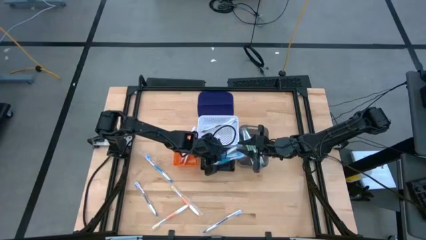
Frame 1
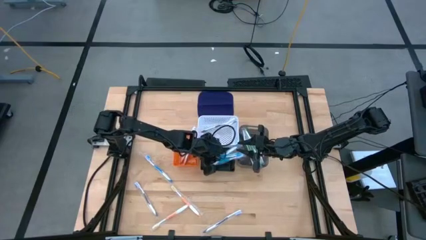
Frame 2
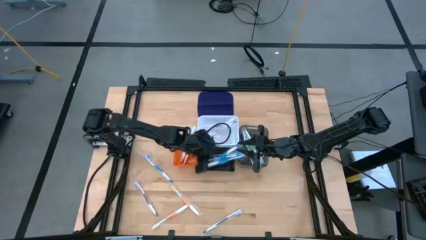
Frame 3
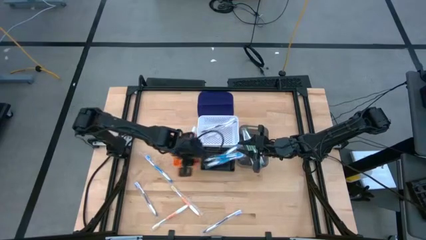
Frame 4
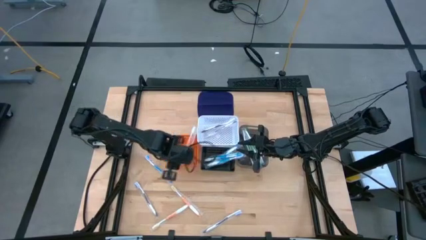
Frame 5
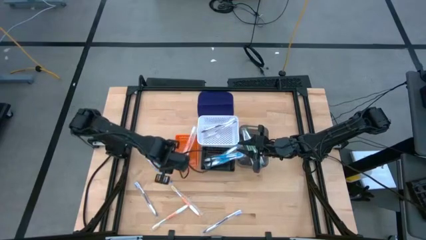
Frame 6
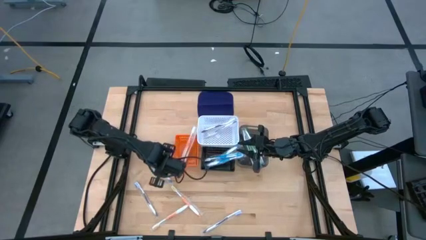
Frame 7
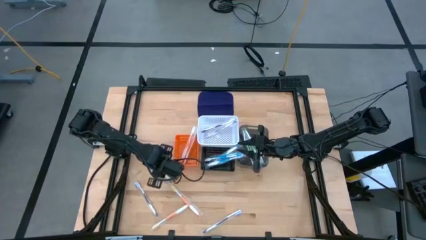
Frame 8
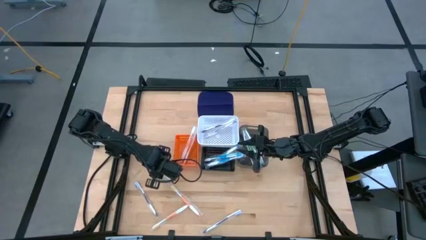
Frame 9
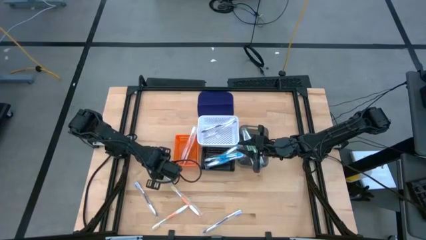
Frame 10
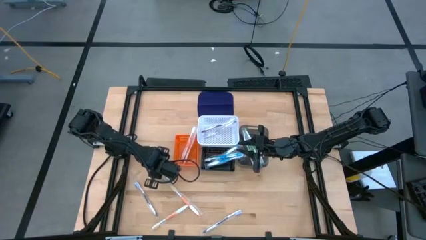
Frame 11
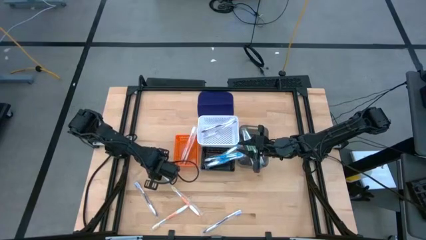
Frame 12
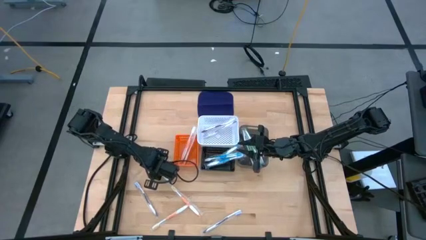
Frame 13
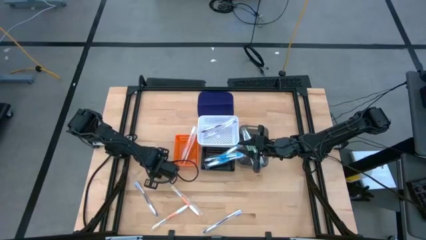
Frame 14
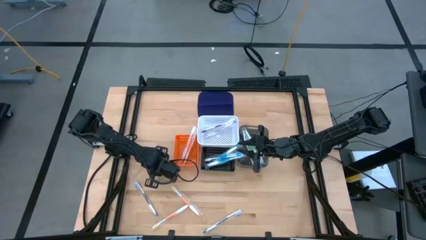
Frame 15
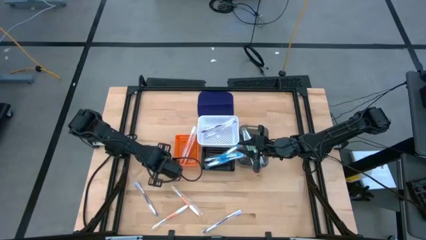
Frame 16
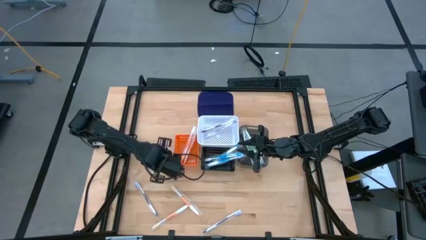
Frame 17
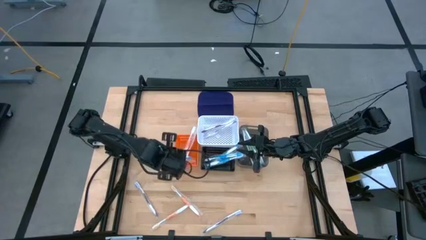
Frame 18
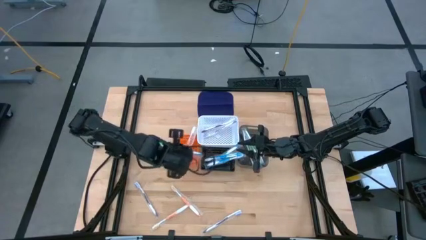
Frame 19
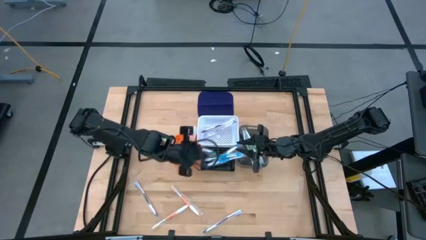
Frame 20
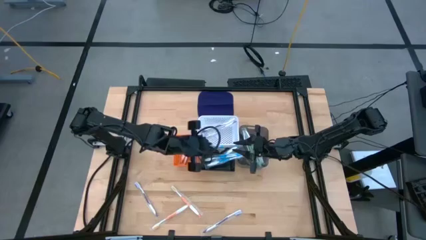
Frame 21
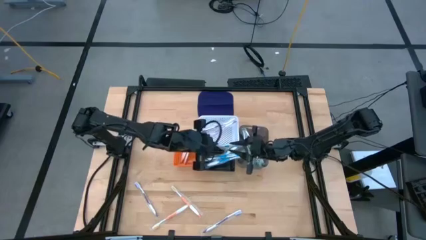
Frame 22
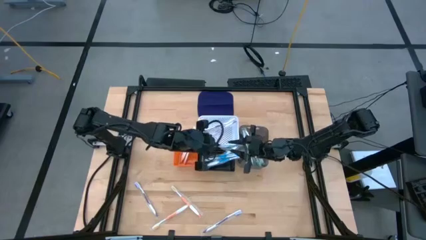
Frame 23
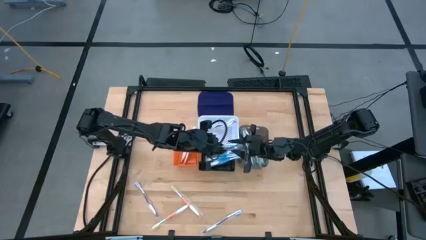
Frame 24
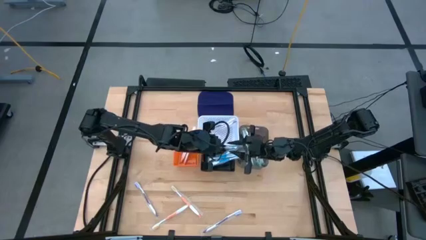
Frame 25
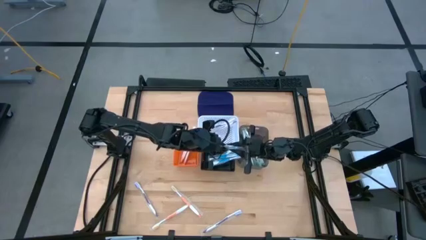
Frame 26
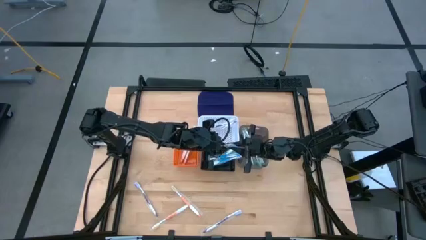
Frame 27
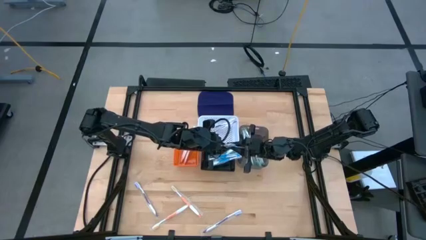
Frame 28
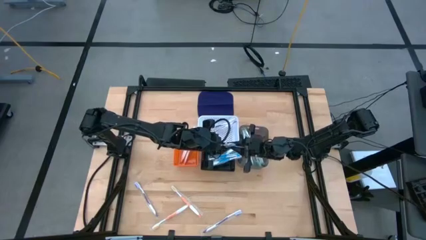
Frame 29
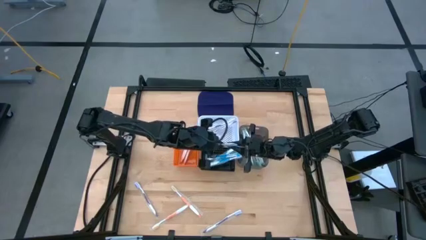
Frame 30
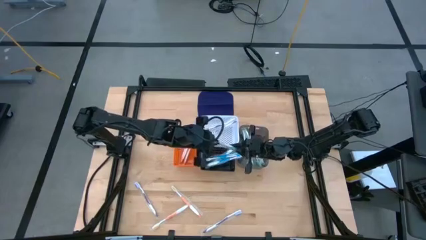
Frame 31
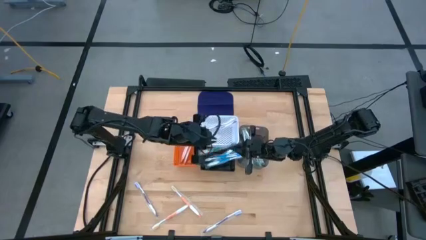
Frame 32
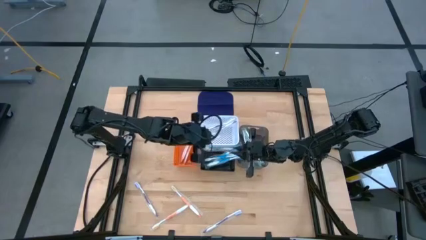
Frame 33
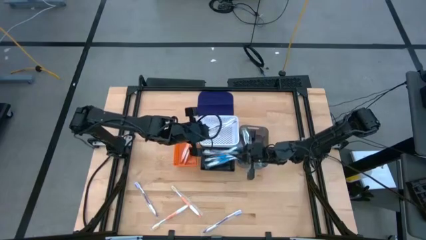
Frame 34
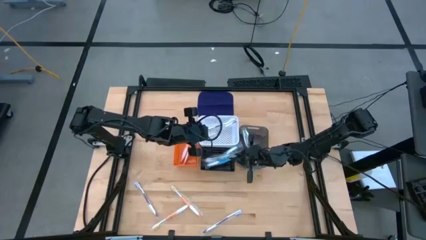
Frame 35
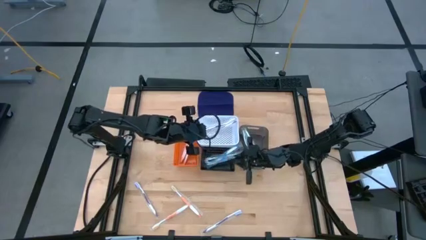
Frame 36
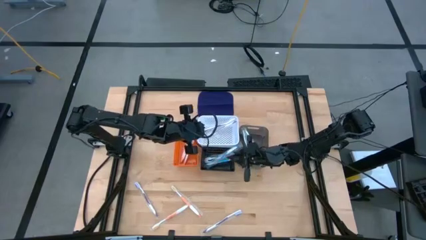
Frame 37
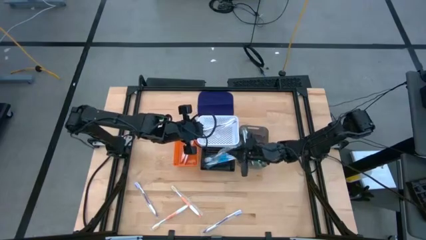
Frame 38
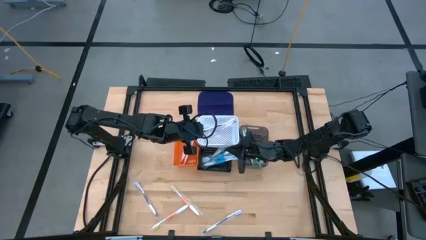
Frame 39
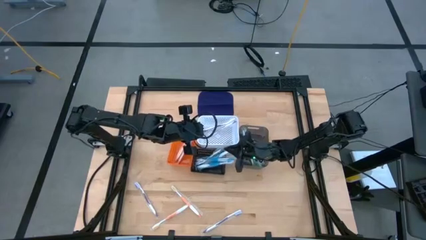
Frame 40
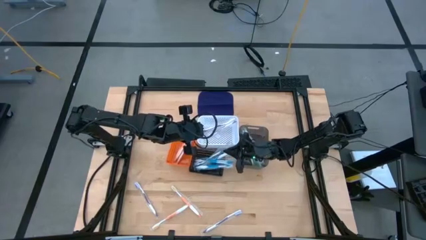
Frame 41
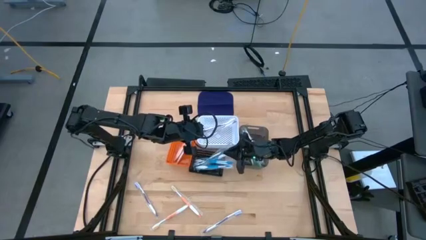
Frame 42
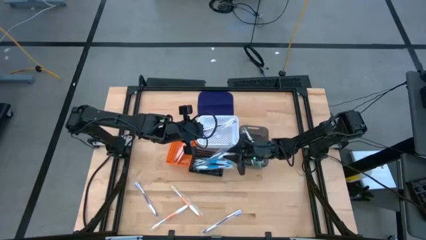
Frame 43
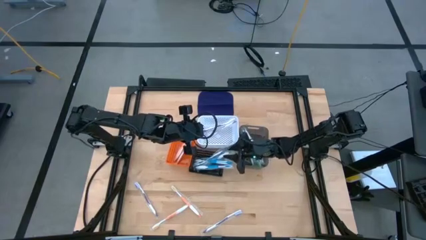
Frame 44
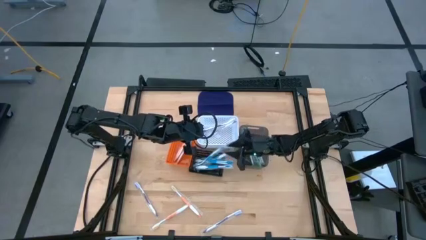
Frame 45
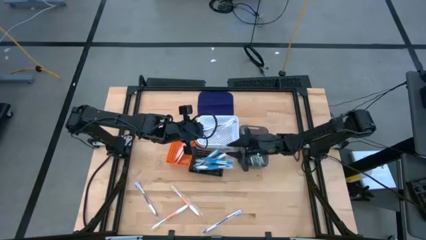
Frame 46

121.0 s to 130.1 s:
Task: Pick & Place Toothbrushes
Put the blue toothbrush into the black basket

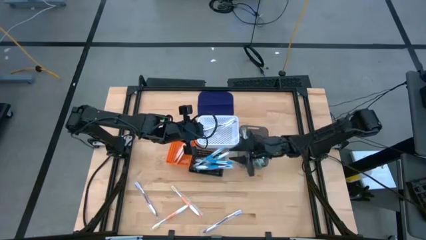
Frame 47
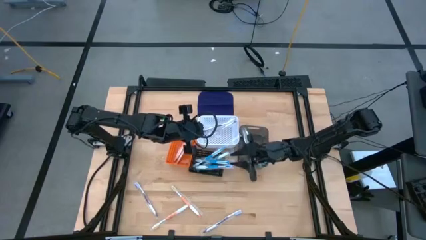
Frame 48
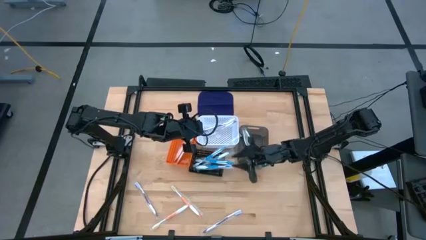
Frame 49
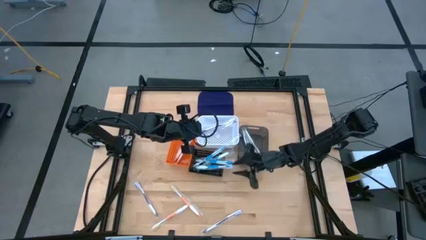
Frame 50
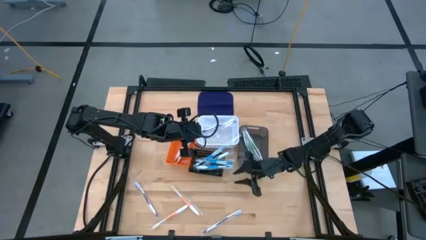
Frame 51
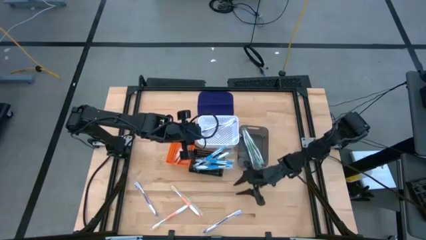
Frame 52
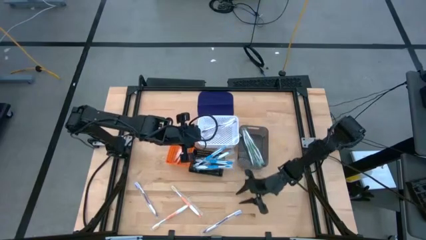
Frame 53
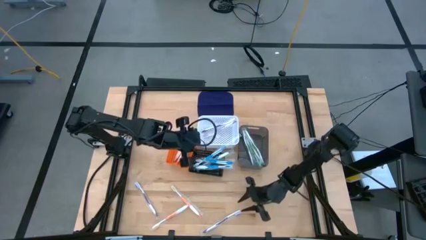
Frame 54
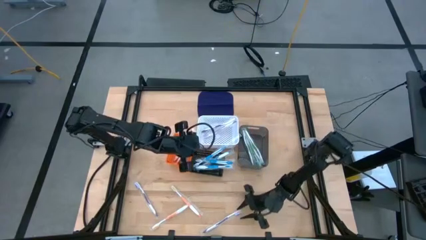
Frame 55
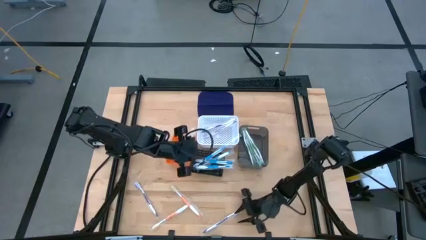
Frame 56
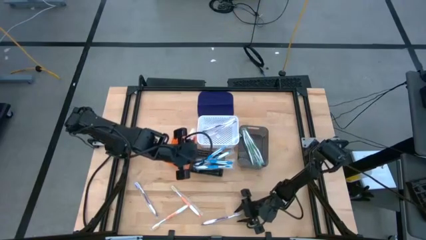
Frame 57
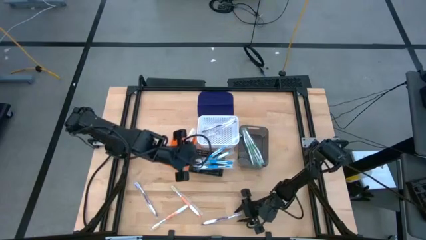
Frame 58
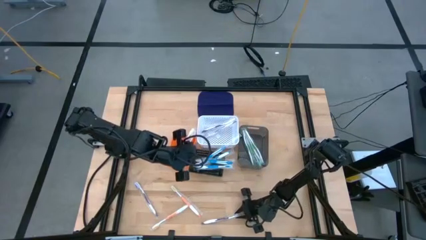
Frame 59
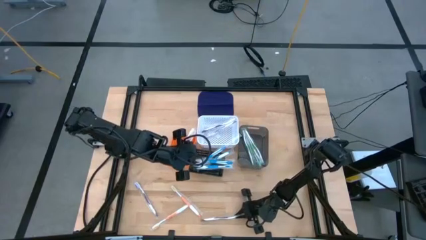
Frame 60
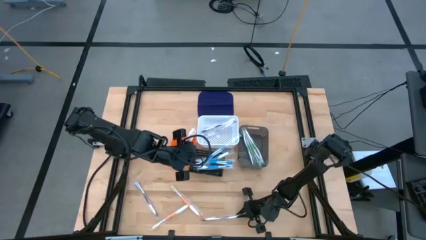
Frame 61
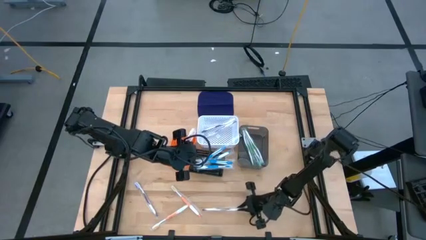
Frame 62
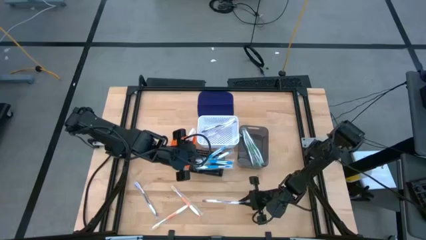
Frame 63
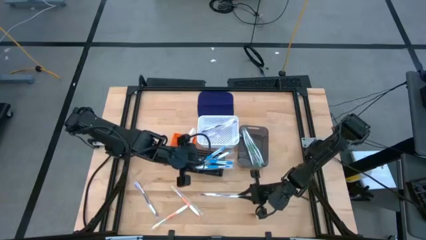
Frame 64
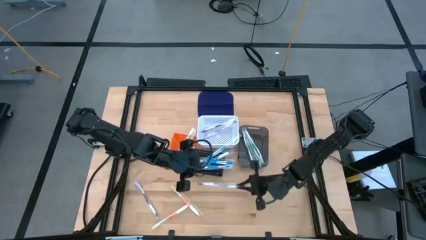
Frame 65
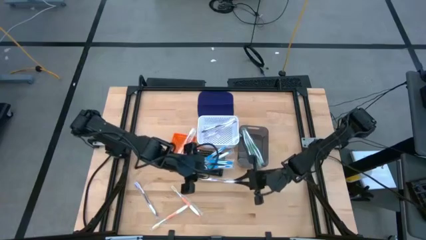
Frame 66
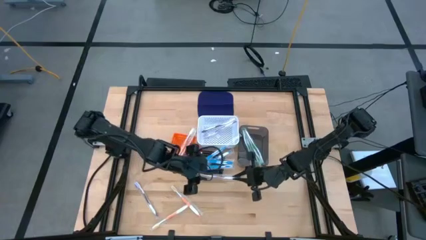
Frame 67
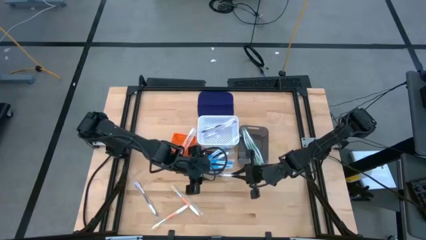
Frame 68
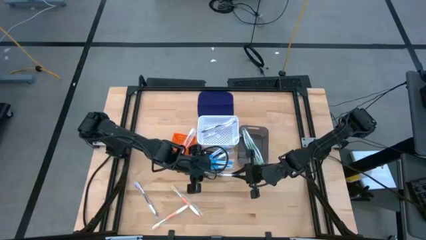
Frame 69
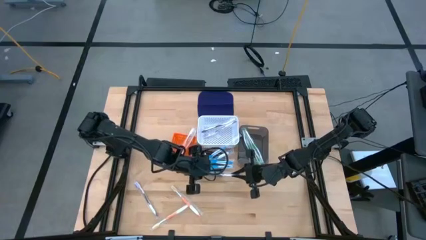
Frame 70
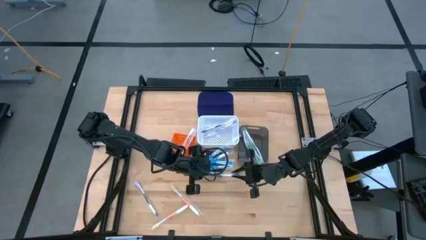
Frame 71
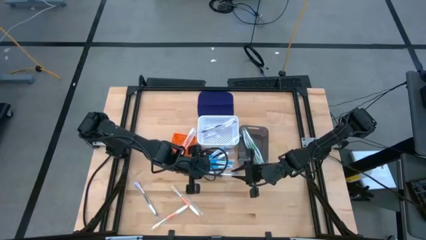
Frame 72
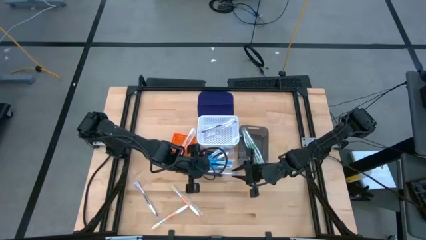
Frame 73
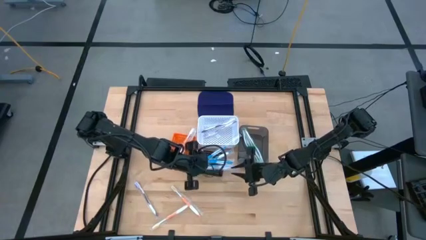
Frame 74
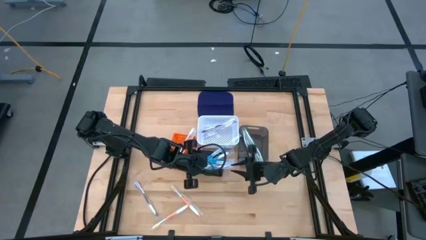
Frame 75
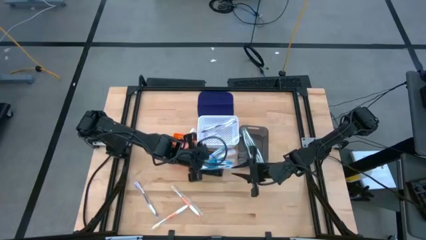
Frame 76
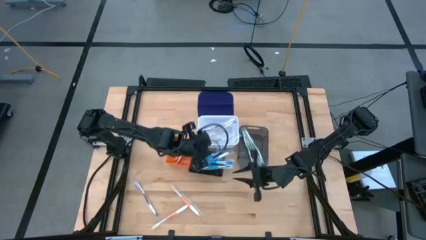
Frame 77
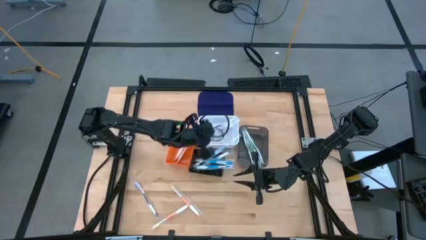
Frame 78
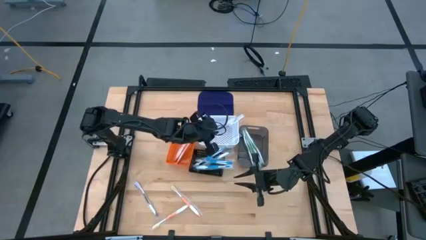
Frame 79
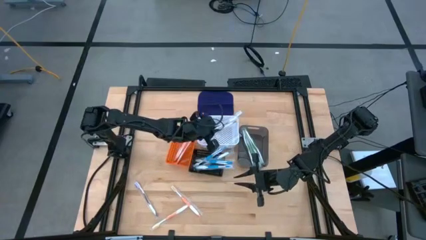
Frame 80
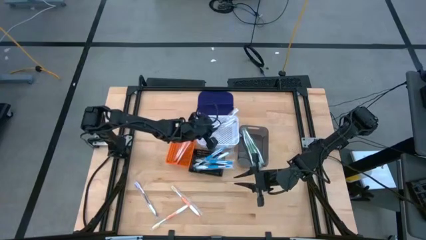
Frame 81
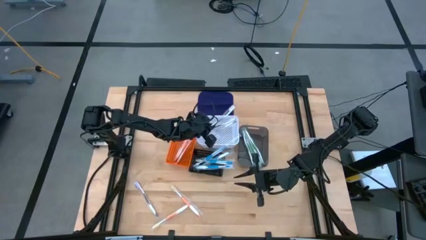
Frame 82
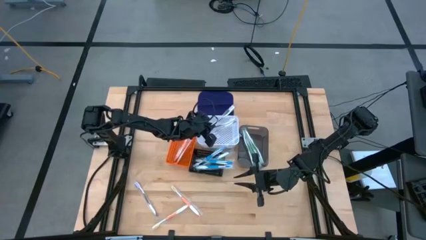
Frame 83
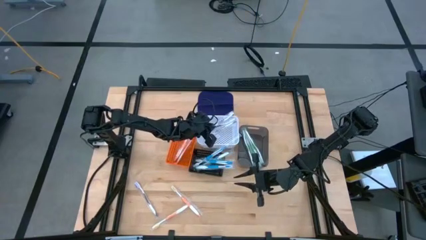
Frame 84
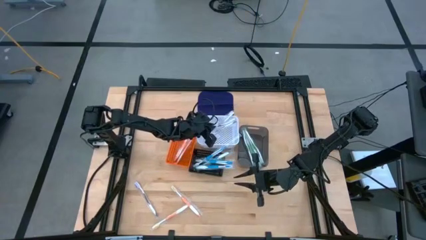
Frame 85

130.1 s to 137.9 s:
Put the purple toothbrush into the white basket
